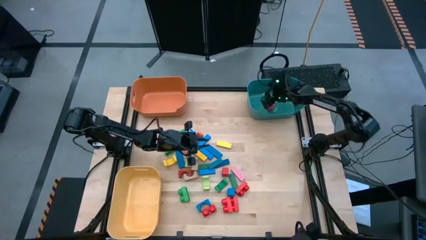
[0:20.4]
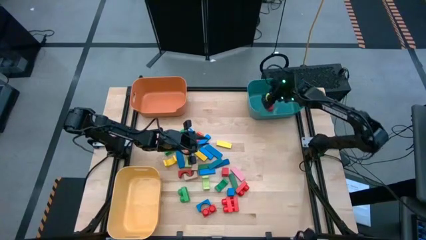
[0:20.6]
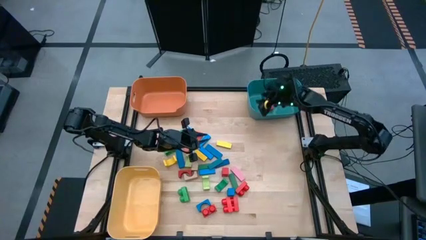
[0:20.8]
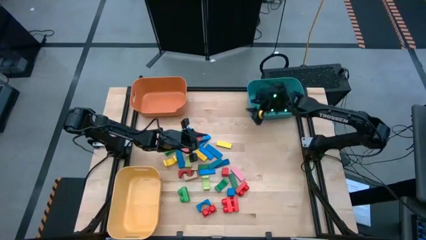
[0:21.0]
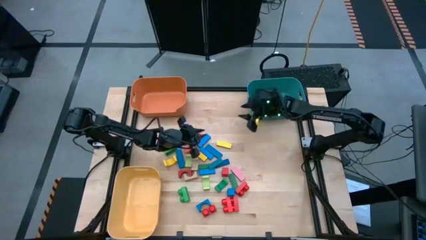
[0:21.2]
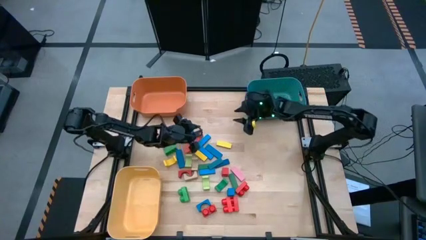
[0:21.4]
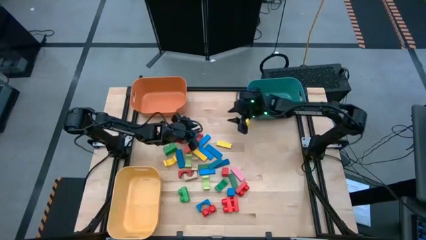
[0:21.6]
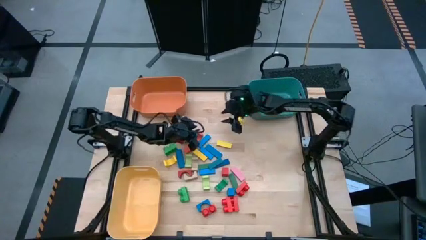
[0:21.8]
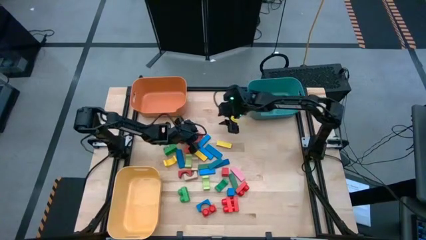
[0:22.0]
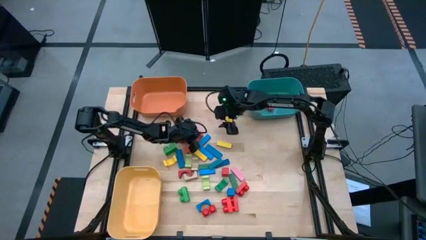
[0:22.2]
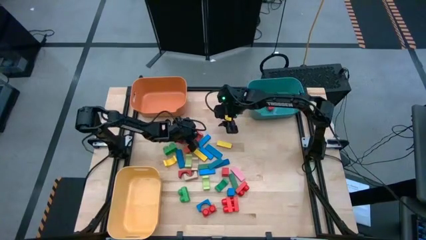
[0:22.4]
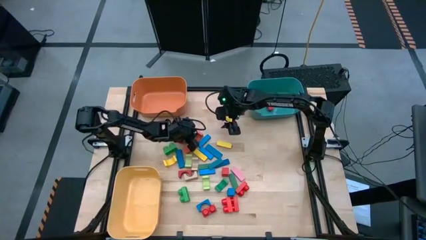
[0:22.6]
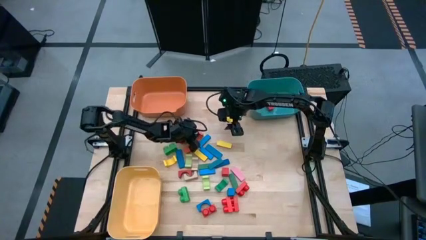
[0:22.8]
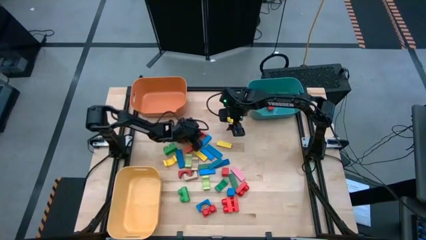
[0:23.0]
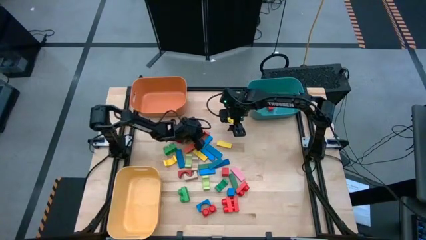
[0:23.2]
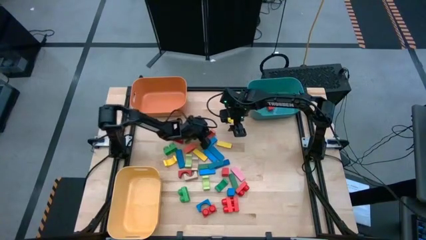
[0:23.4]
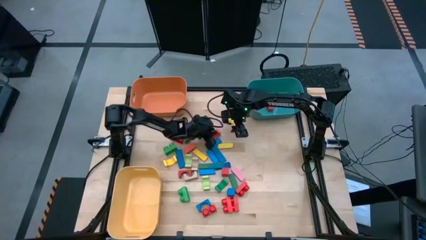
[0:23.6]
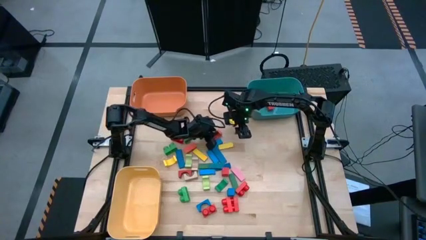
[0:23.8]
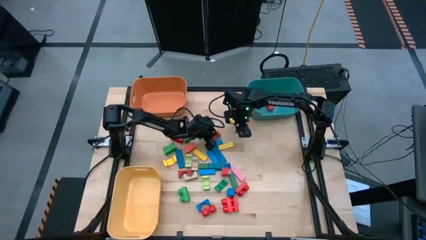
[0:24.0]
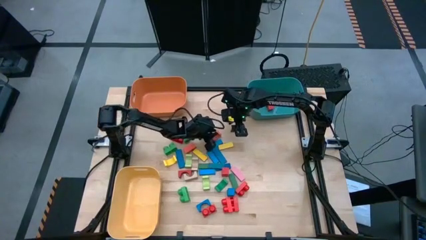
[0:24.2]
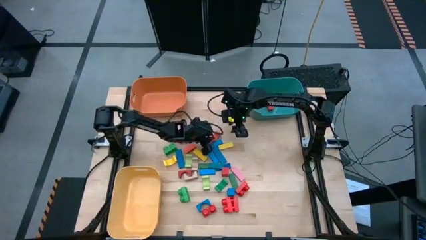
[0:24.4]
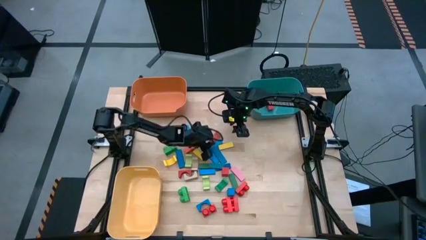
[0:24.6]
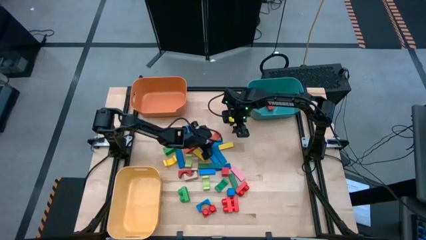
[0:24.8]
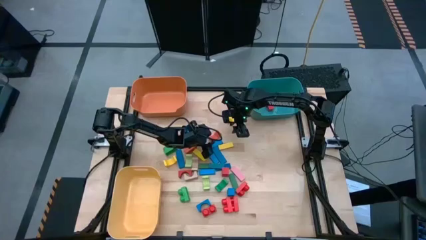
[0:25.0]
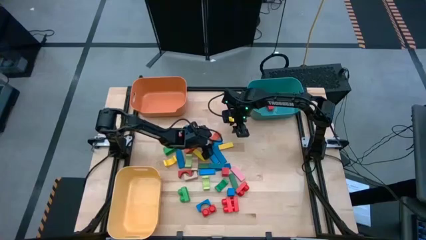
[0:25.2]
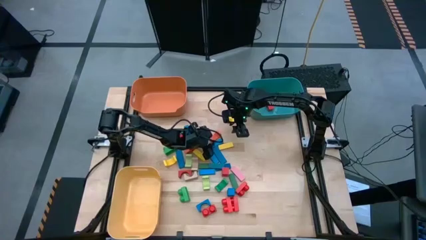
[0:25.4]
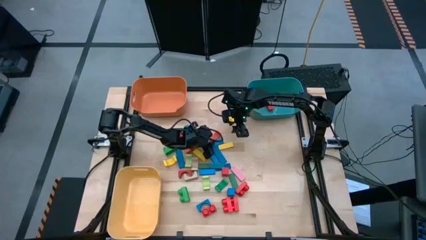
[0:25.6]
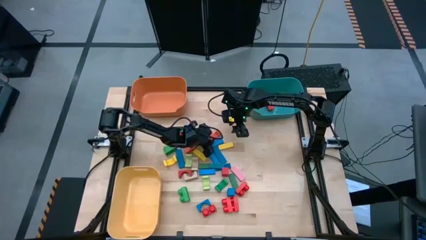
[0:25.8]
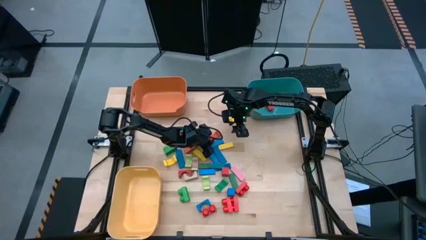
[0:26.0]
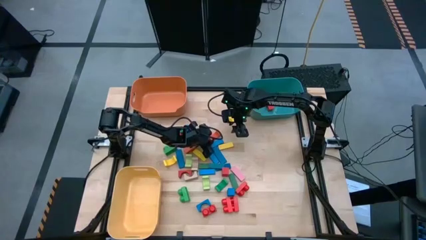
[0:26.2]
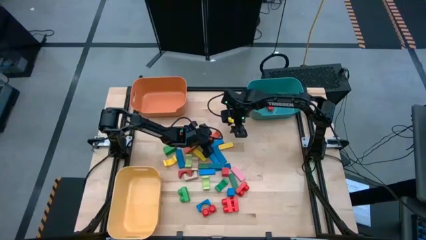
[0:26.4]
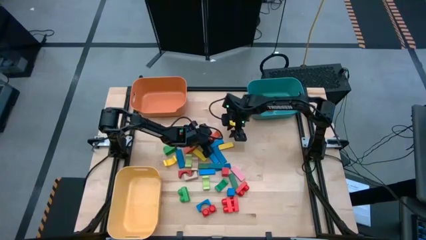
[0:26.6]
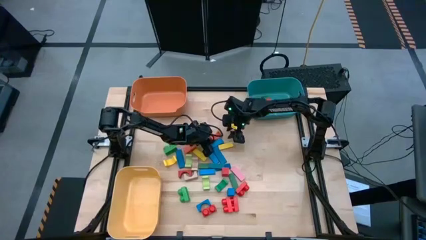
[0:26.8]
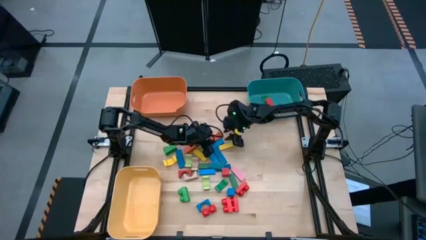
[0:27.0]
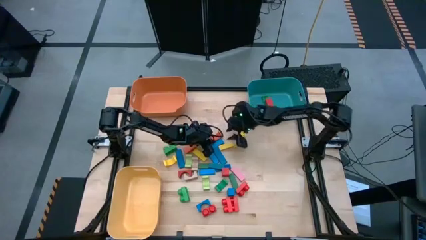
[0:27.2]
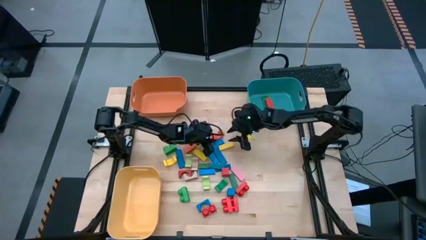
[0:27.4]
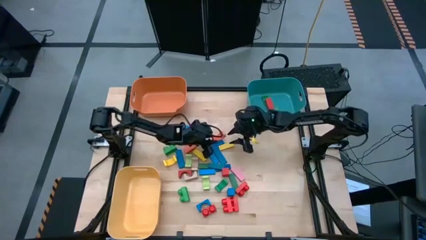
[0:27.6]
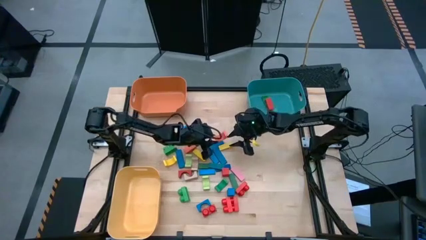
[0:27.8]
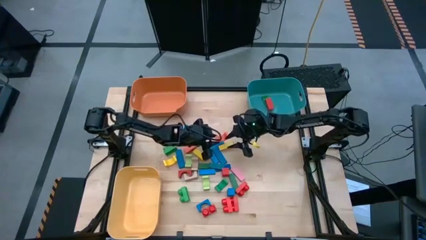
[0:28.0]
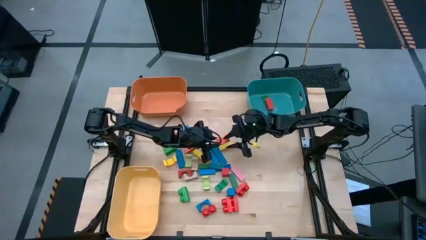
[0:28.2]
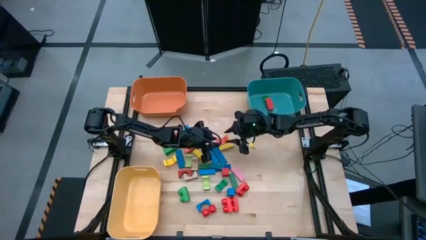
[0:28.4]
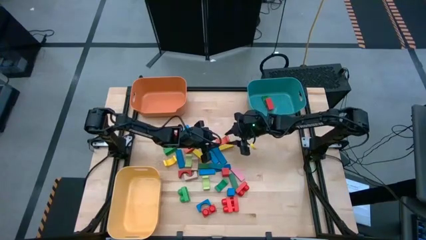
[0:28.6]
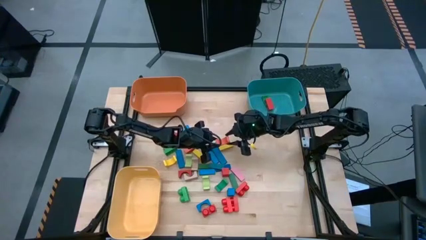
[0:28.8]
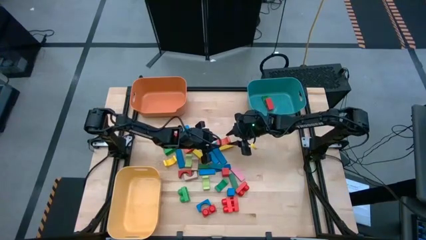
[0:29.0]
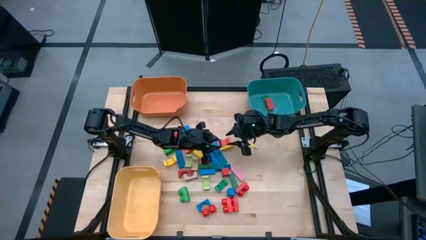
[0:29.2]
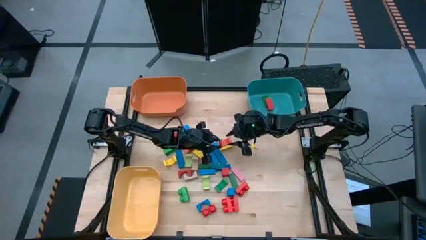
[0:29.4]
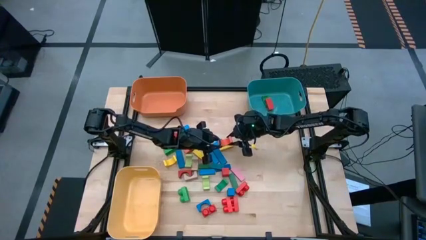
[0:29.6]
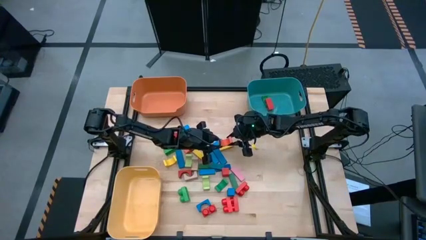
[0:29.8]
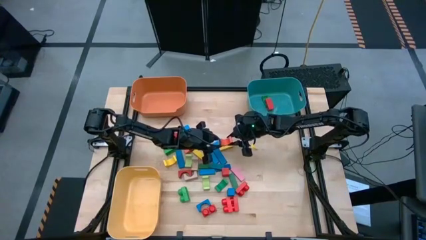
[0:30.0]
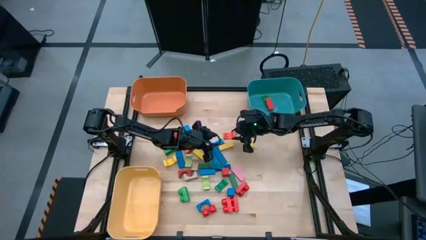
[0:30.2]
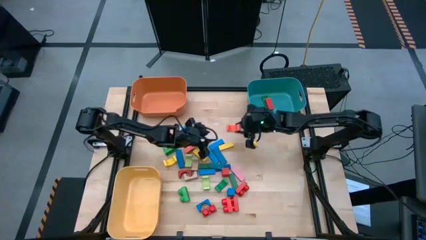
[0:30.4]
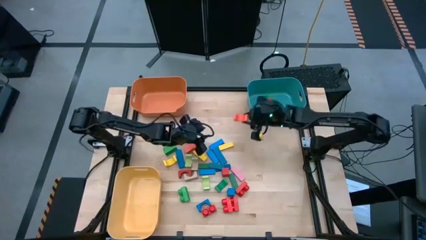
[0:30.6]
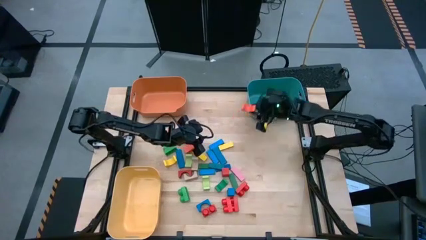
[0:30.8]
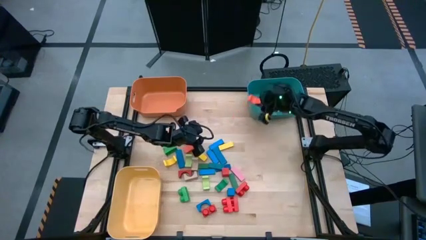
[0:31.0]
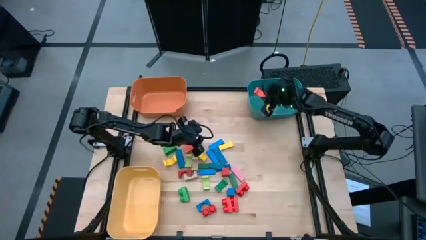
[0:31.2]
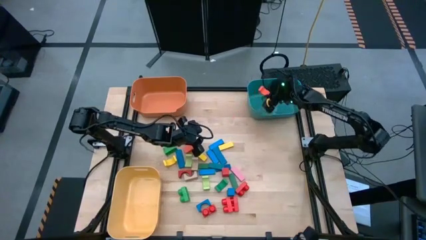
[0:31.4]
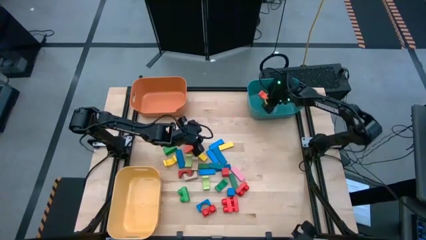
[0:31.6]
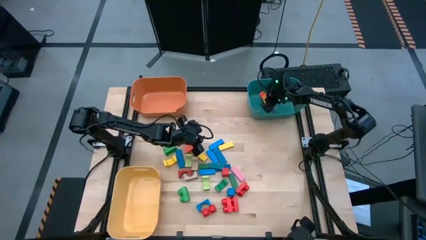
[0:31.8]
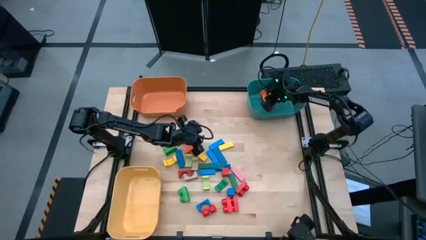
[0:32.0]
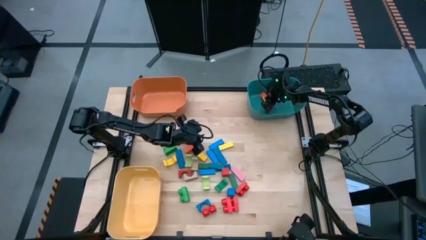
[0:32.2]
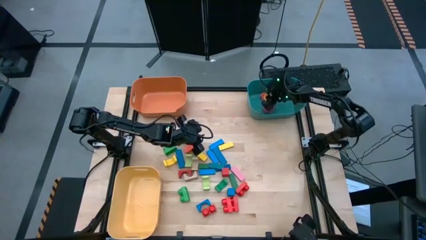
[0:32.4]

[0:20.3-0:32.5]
Task: Sort blocks by size
Put the orange arch block into the blue bin

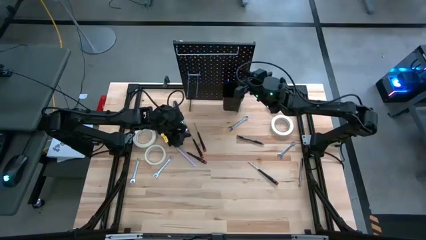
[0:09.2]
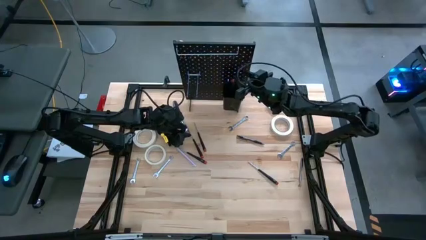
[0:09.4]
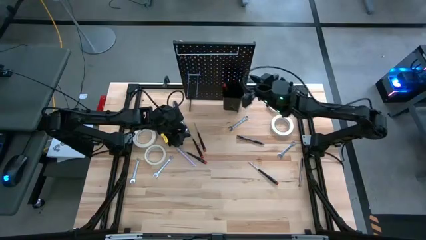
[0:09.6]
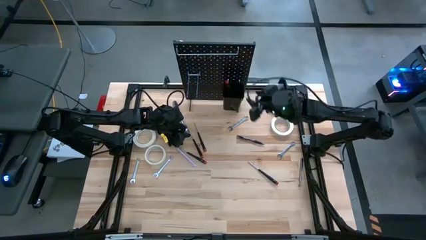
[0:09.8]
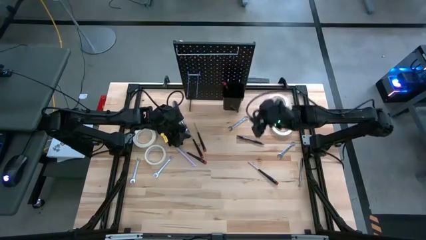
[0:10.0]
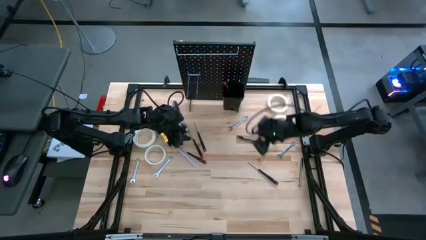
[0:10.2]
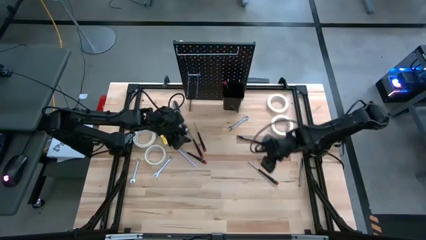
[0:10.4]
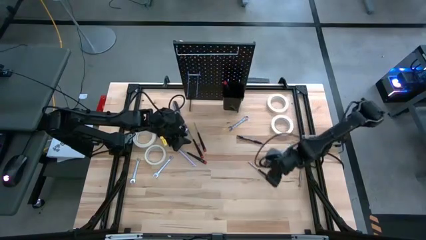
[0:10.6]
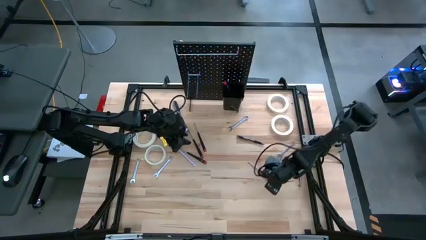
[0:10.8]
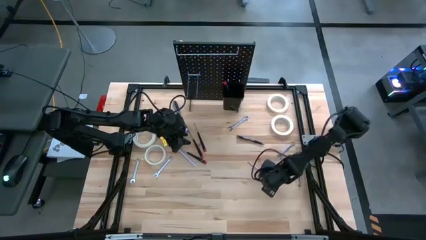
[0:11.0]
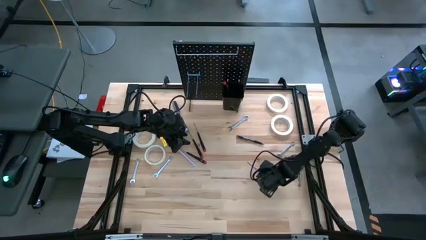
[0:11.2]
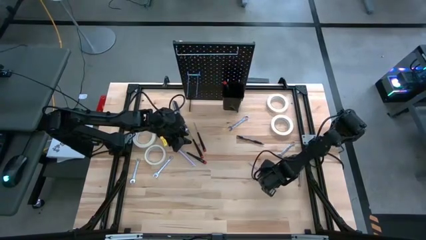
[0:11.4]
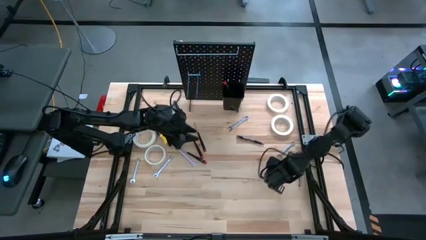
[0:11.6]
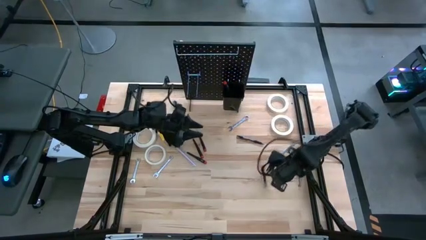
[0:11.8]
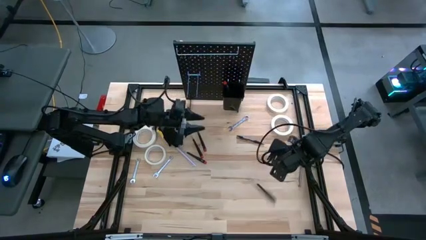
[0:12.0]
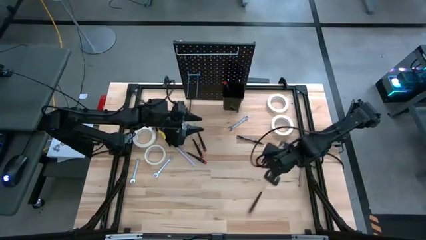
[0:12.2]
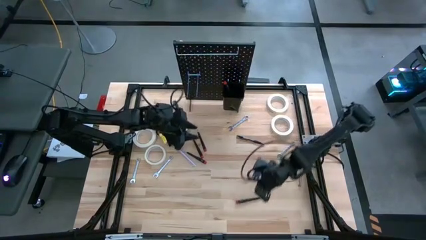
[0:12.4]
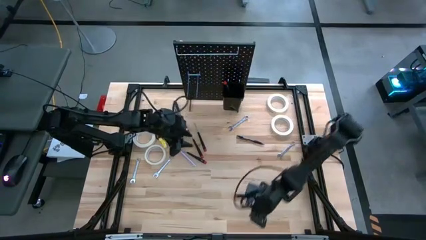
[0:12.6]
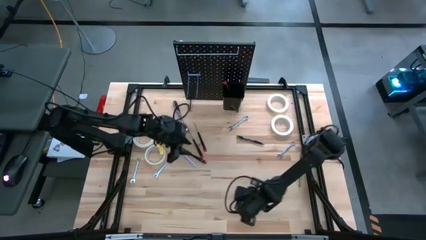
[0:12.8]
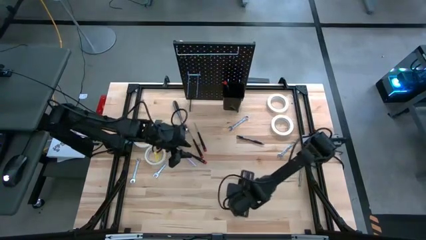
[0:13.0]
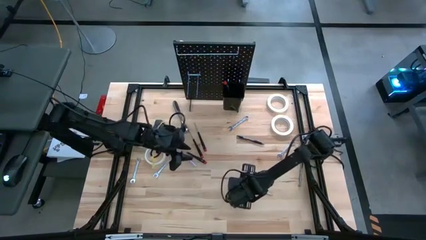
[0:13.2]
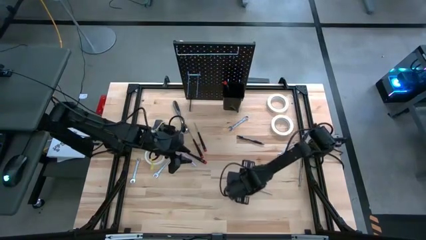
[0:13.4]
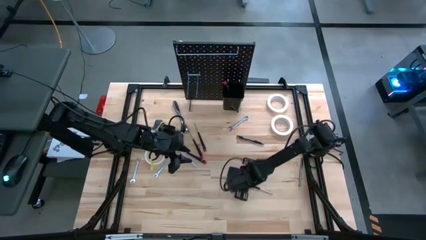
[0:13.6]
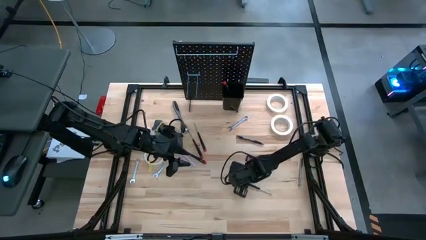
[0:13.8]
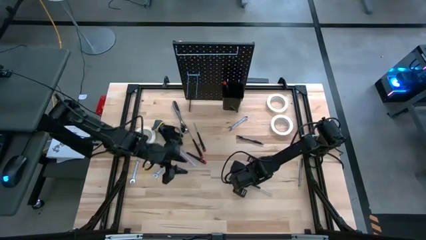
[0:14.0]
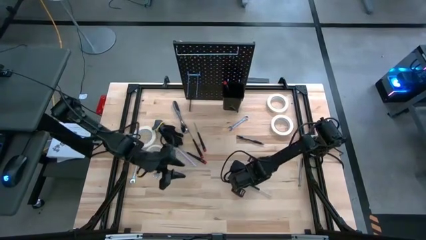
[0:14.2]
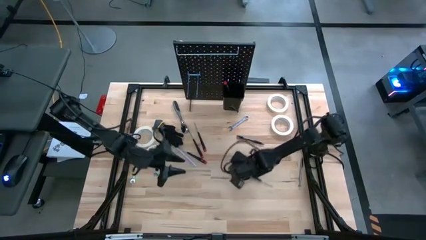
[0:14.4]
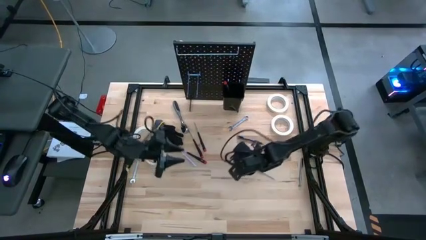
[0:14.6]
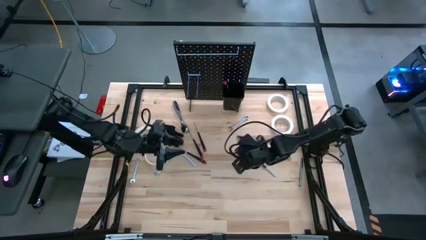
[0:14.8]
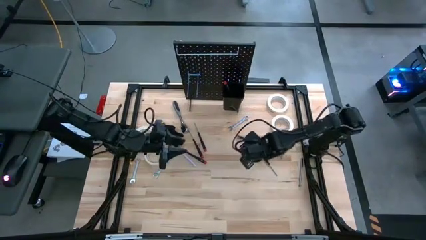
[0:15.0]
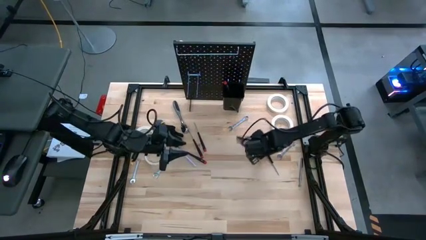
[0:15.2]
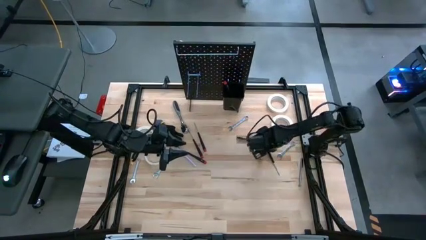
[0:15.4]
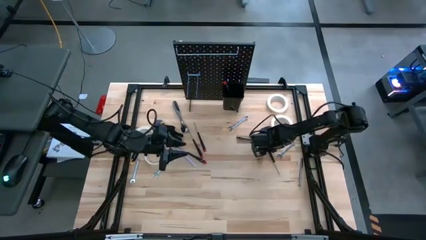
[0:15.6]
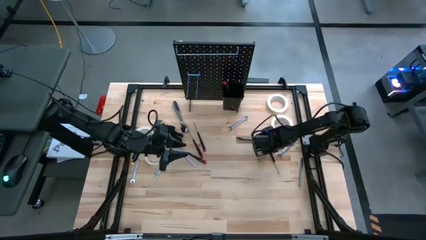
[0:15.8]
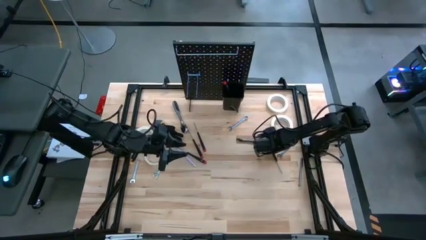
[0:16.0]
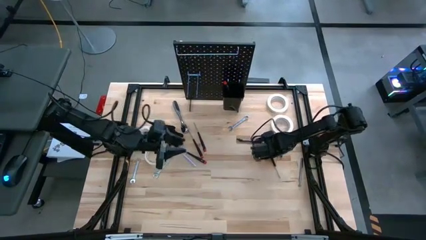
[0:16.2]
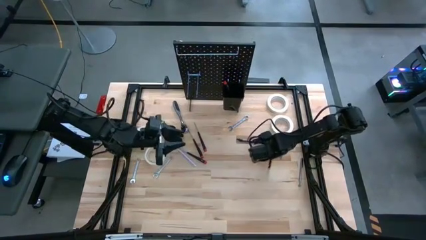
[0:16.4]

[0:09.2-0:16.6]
Task: Hang tools onto peg board
Put the nut driver into the black bin on the pegboard
